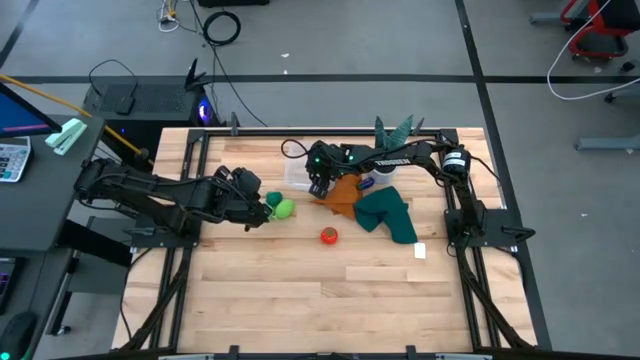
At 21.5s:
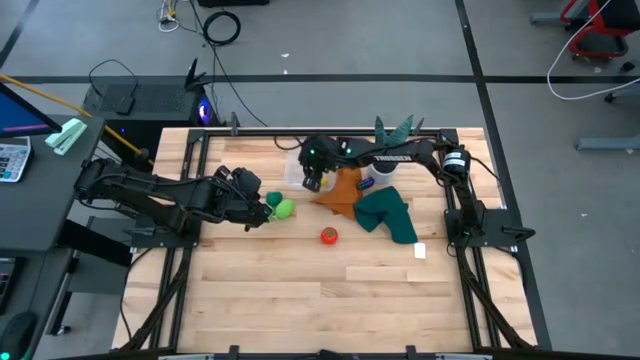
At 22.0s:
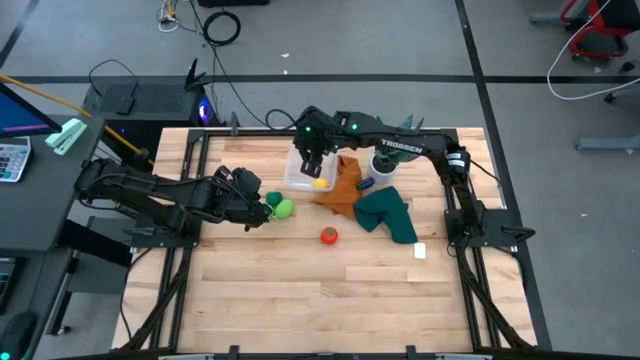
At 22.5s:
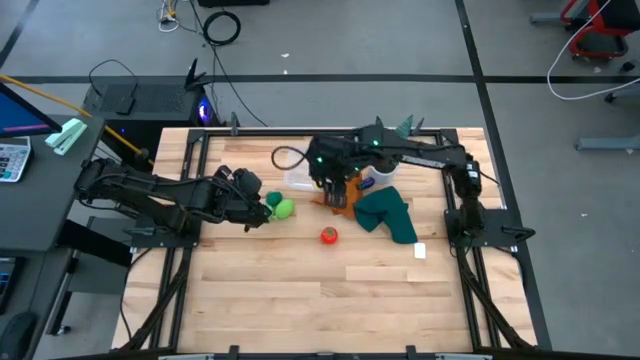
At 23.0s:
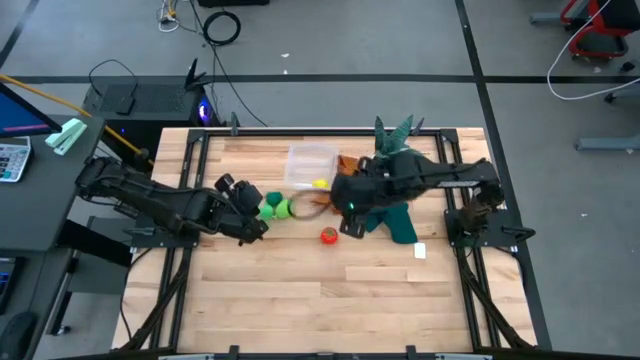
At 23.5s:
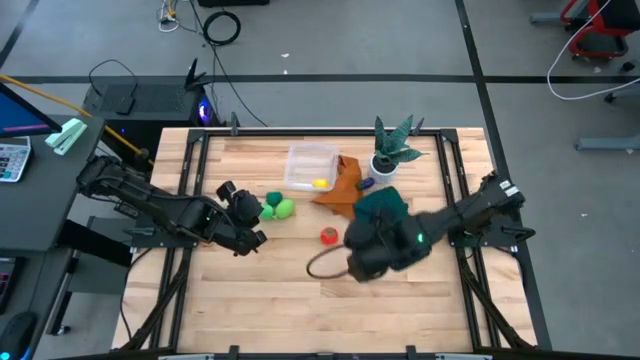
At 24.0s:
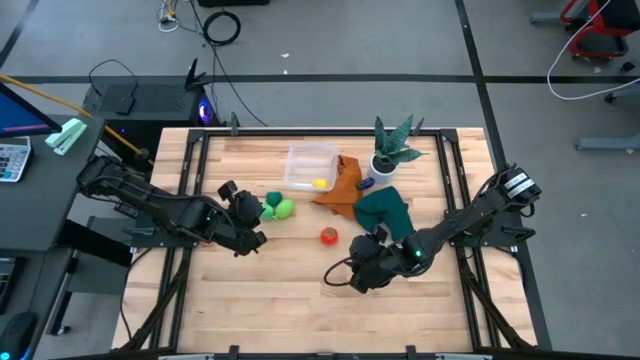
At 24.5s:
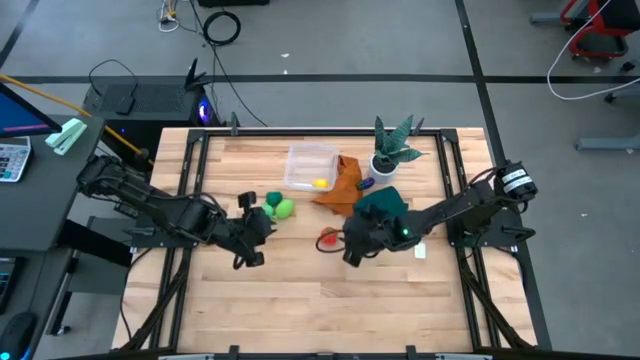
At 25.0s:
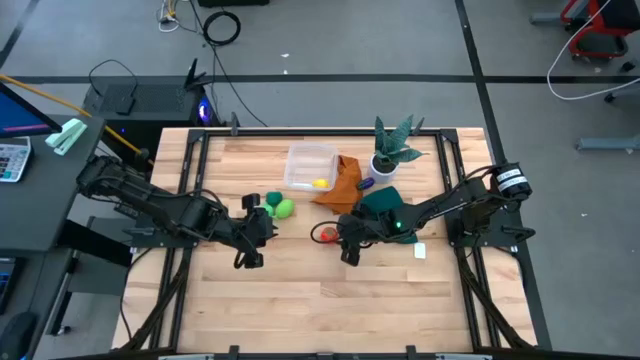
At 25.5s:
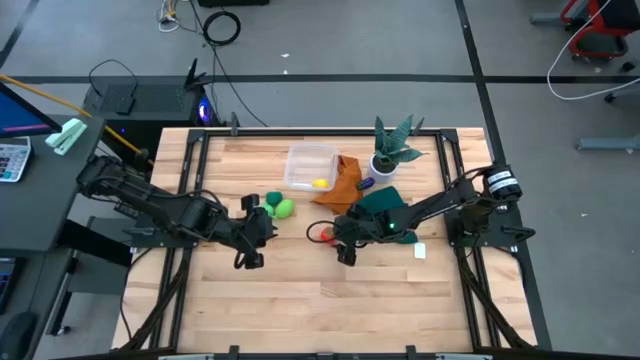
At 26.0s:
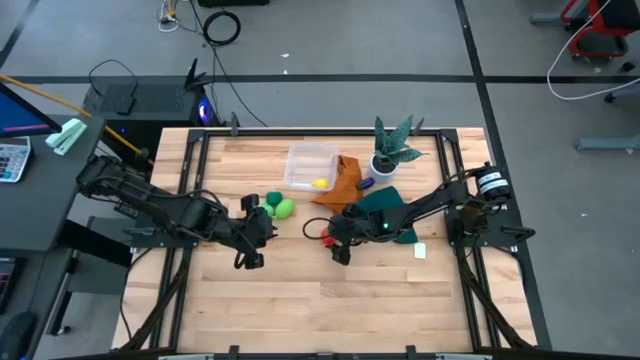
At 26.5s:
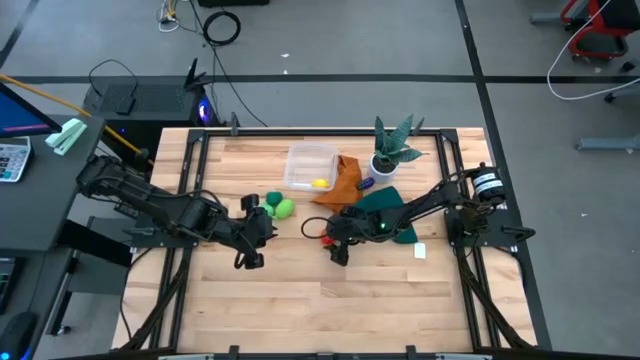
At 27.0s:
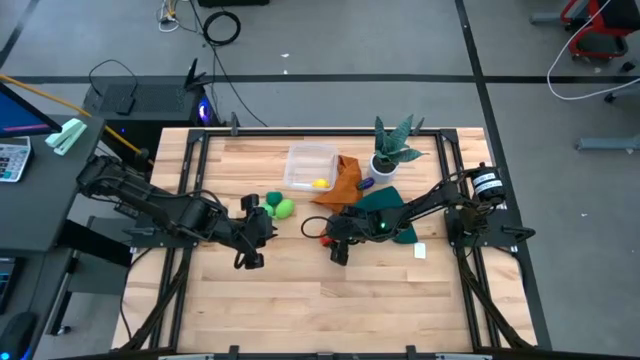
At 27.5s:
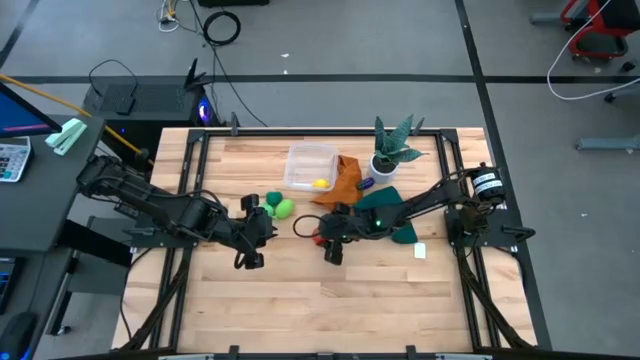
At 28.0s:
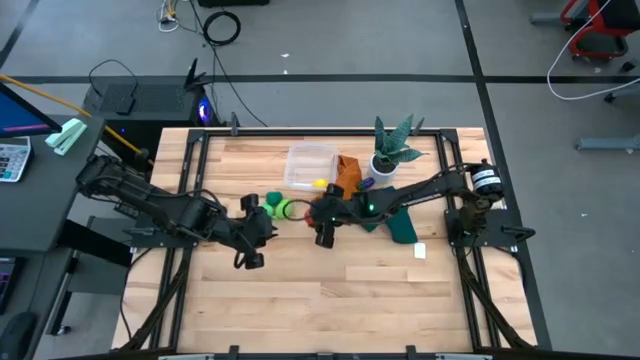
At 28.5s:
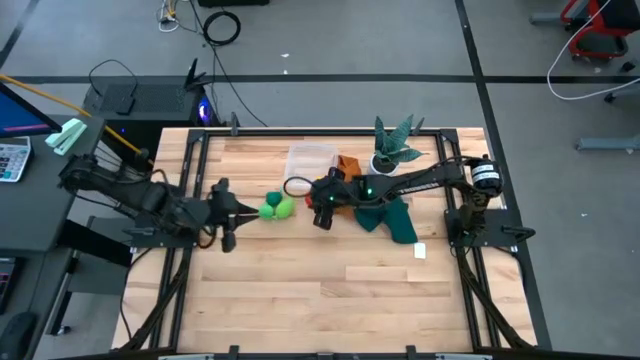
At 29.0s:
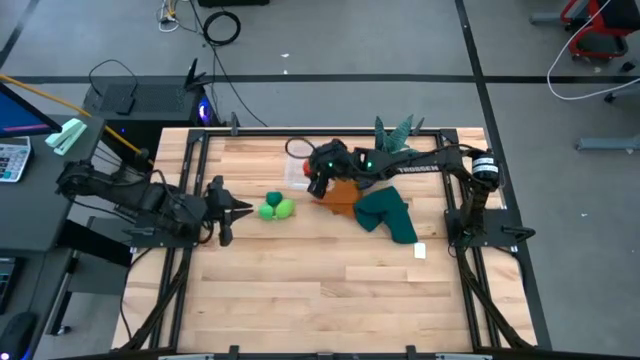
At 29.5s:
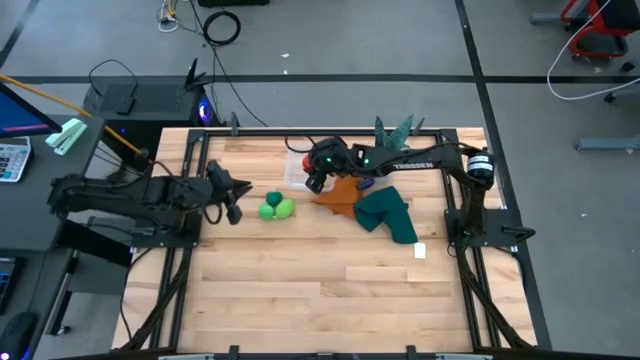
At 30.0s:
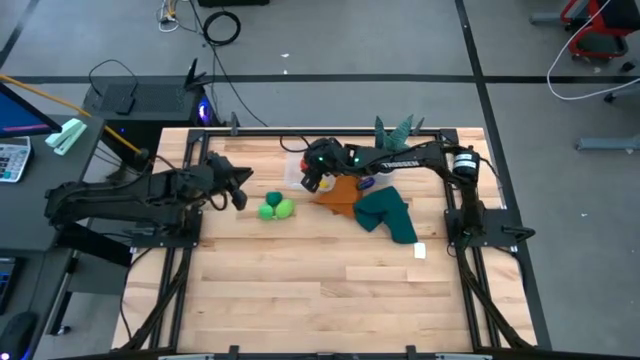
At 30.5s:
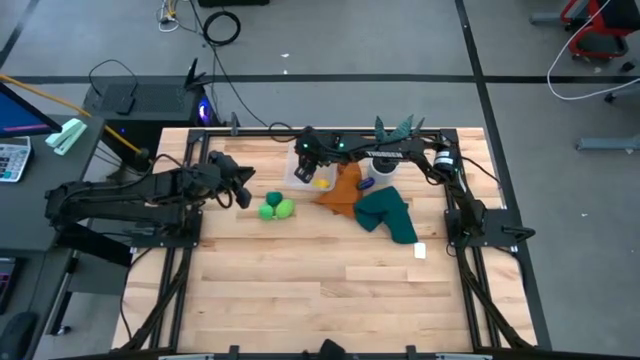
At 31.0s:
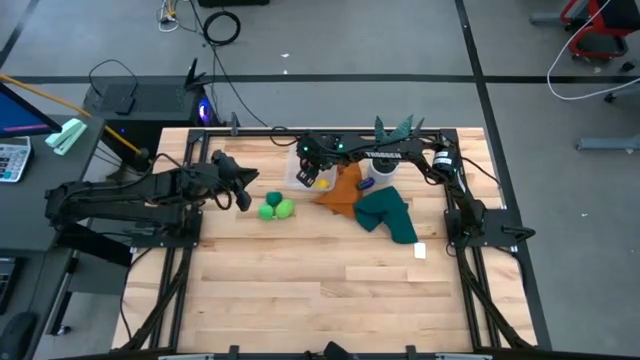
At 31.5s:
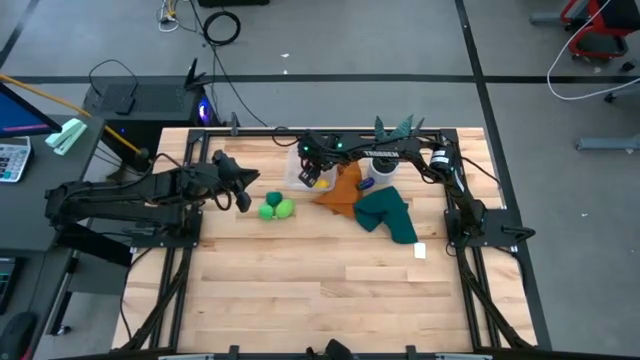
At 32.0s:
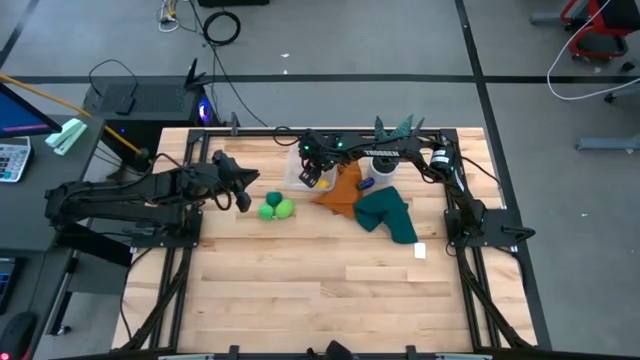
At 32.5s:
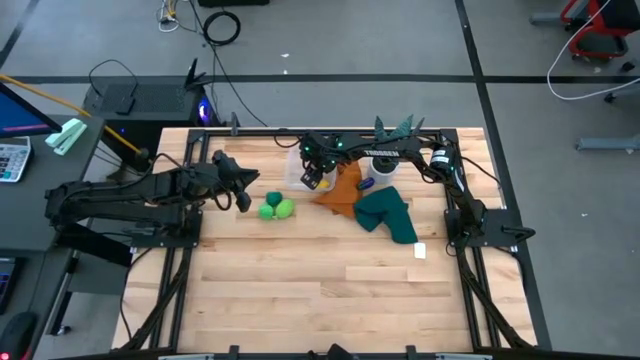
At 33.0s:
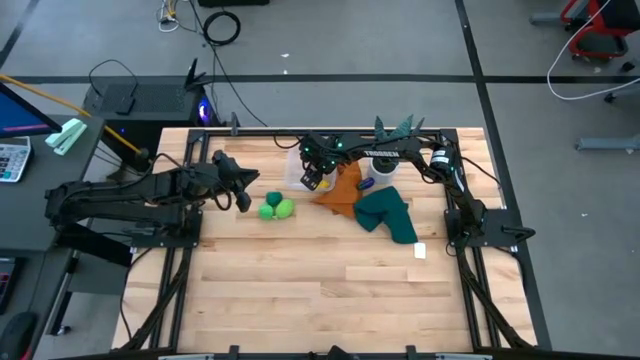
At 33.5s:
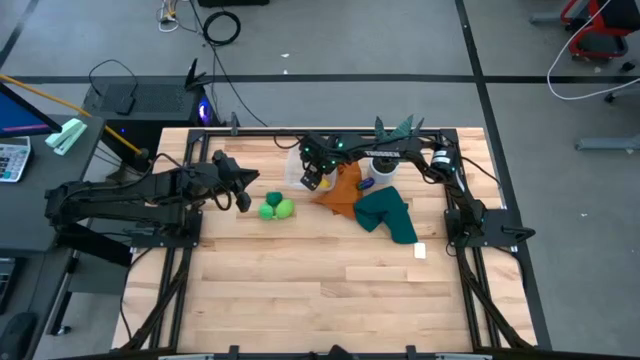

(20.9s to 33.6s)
Task: Pick and placing Produce into tupperware
Put the red tomato into the transparent container

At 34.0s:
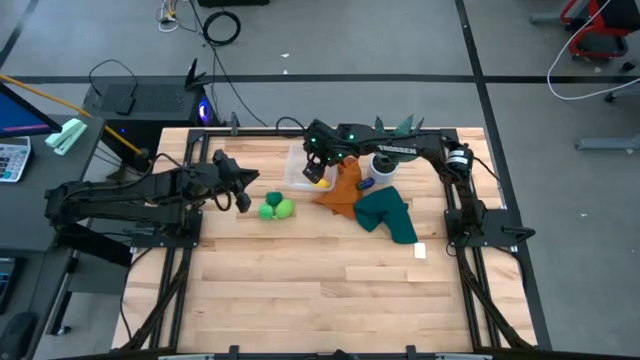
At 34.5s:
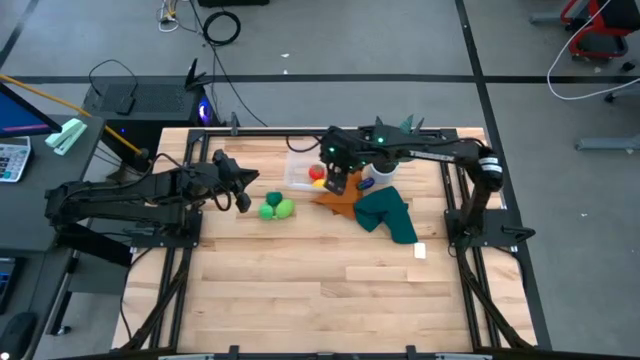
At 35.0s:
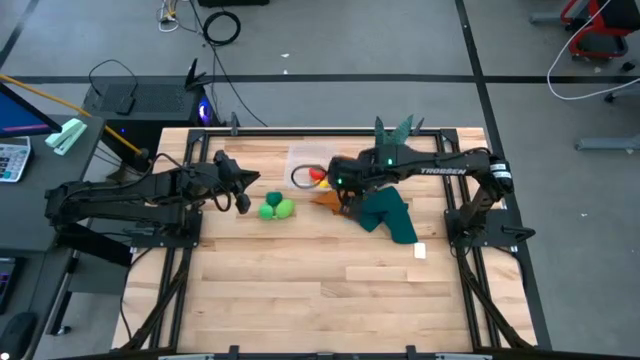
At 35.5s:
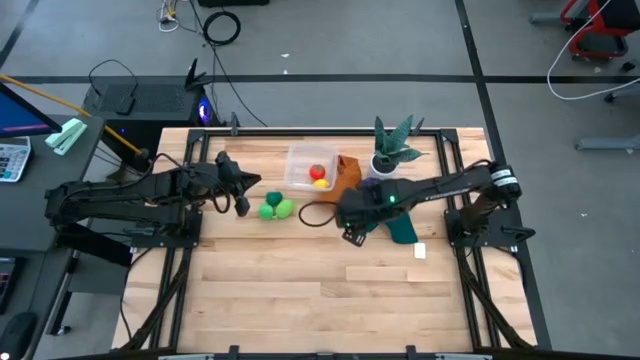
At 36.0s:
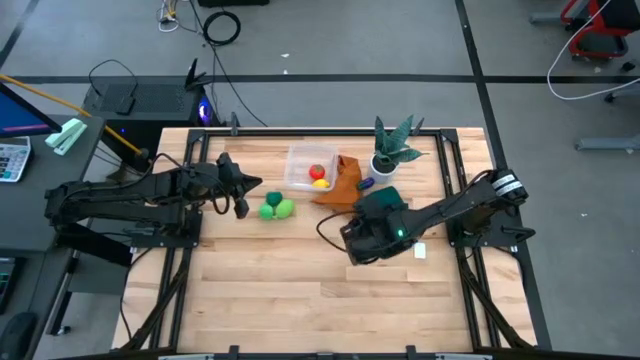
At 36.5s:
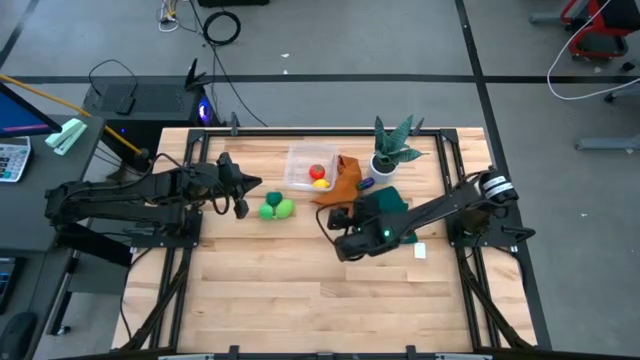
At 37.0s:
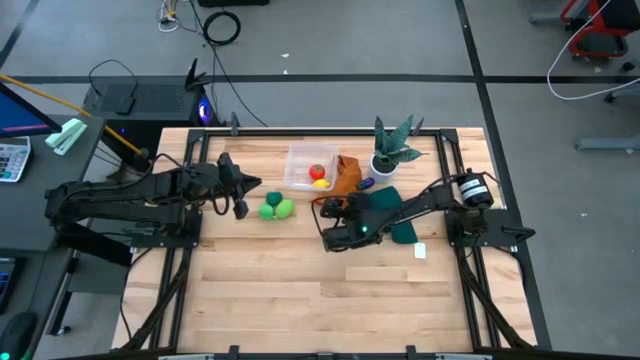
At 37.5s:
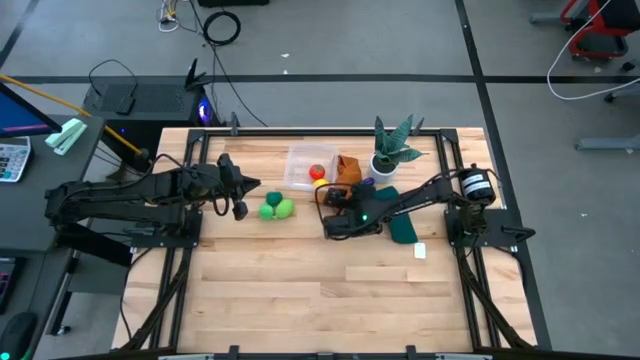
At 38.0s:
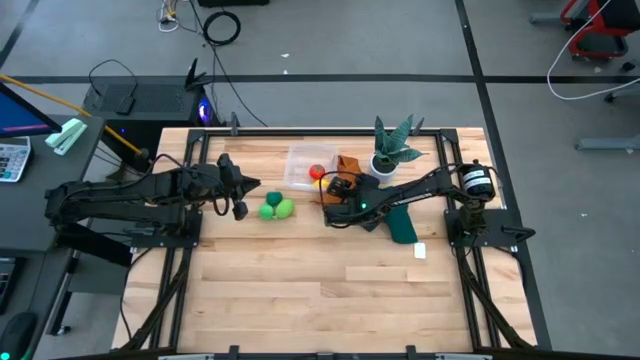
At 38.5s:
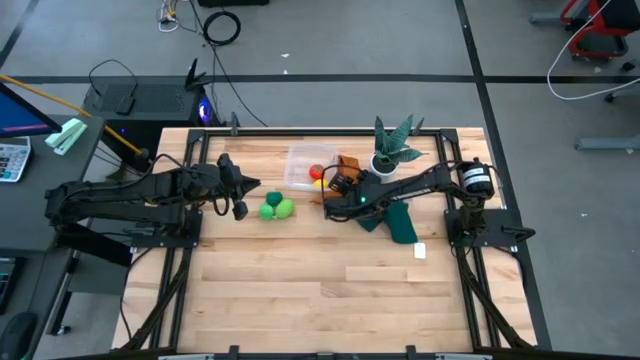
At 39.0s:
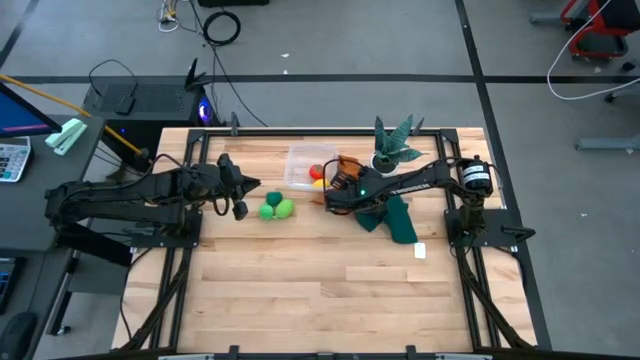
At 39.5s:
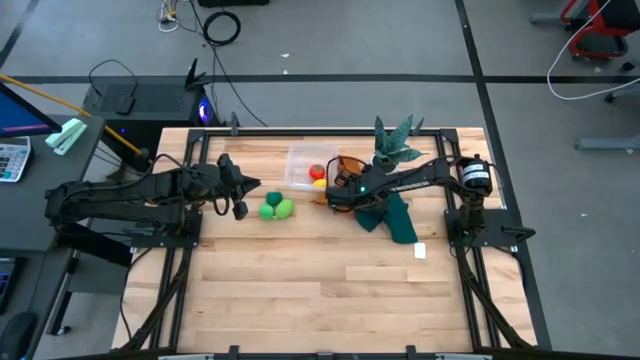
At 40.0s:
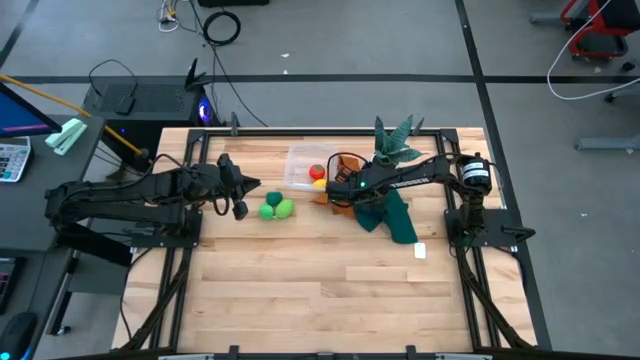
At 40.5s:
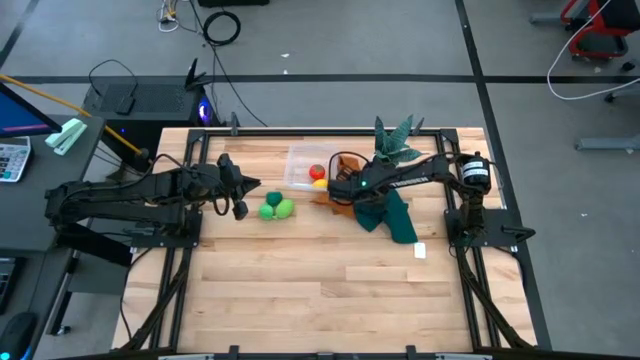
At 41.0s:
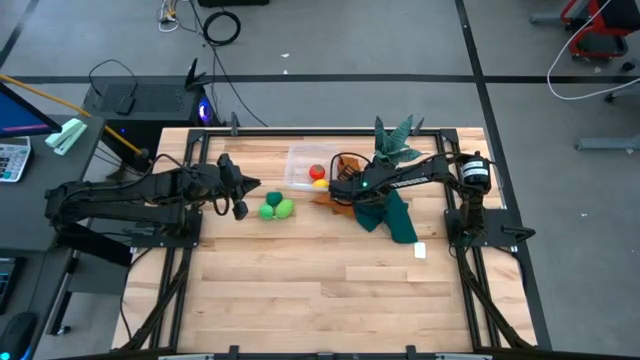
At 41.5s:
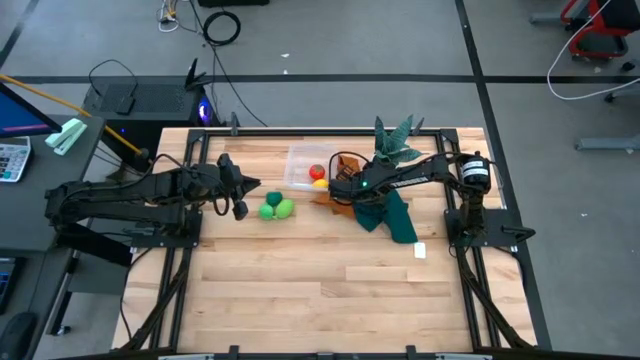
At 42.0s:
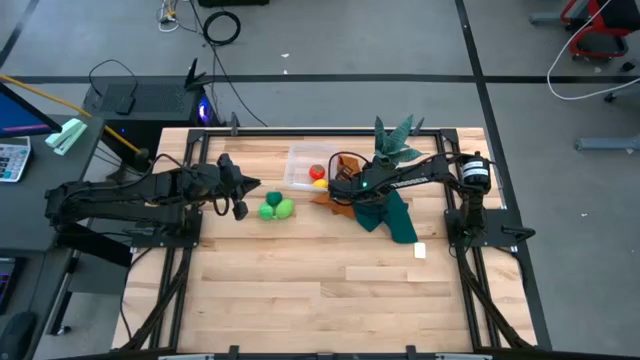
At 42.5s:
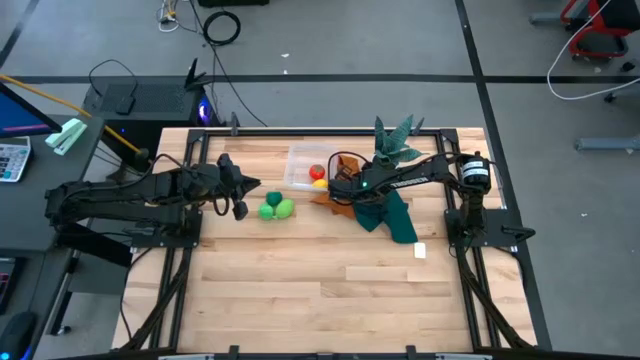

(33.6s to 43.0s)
Put the violet eggplant into the transparent container
